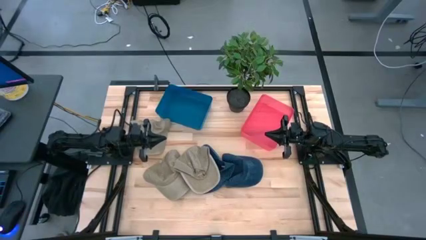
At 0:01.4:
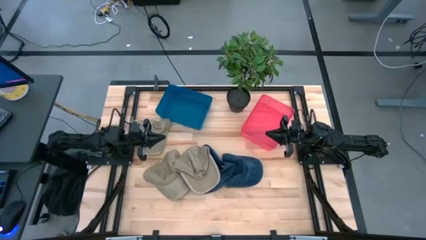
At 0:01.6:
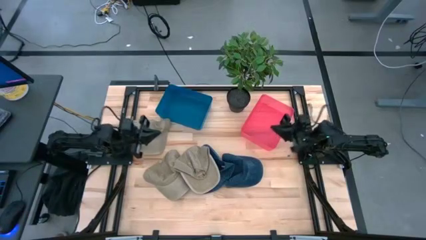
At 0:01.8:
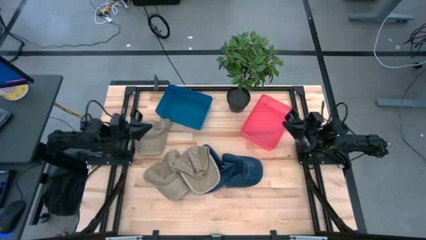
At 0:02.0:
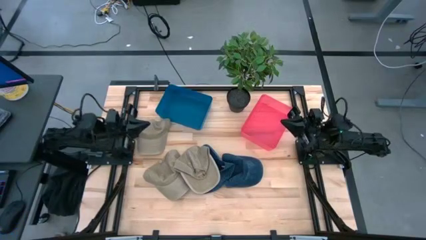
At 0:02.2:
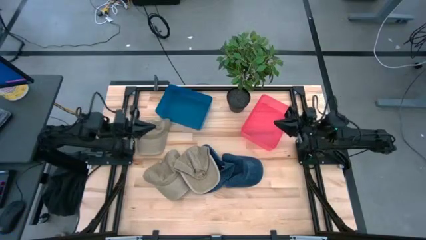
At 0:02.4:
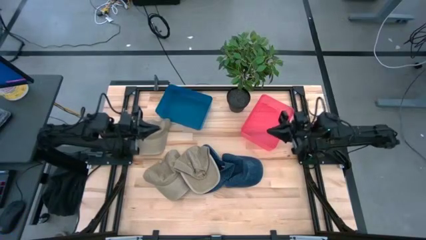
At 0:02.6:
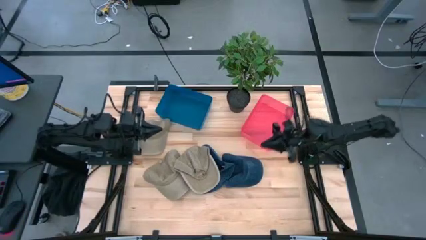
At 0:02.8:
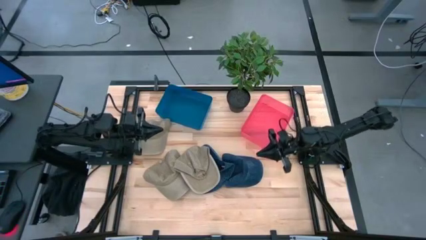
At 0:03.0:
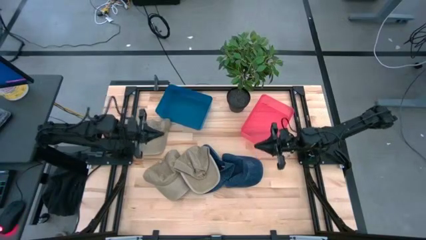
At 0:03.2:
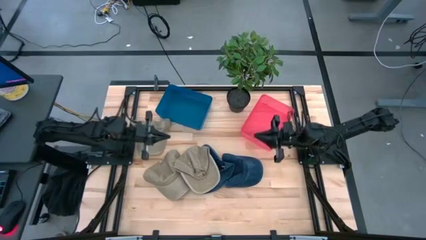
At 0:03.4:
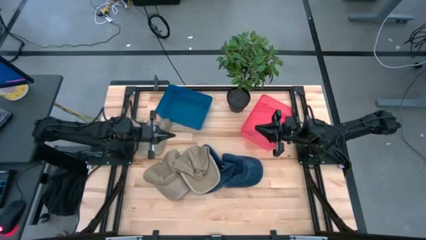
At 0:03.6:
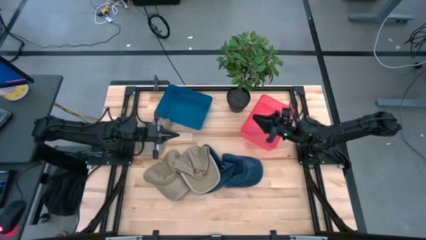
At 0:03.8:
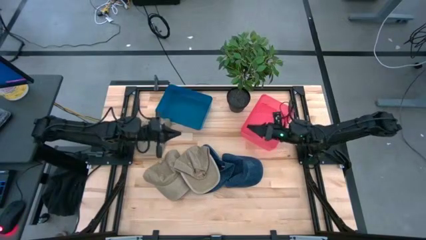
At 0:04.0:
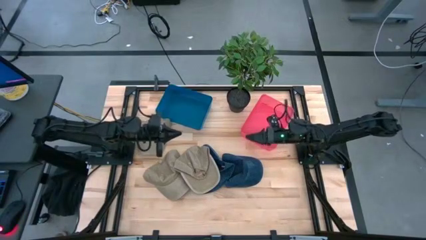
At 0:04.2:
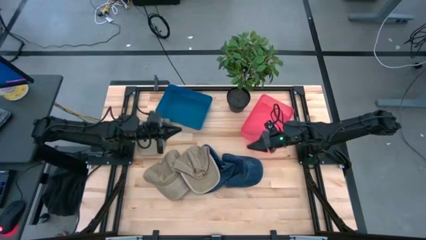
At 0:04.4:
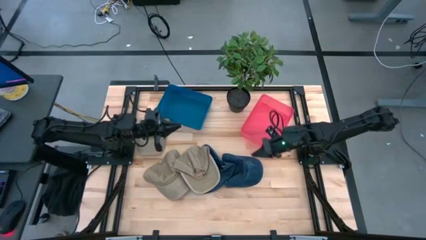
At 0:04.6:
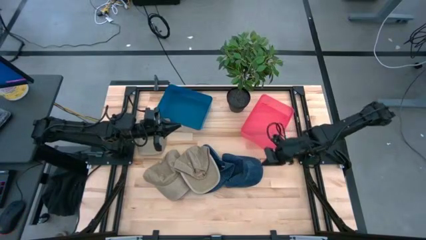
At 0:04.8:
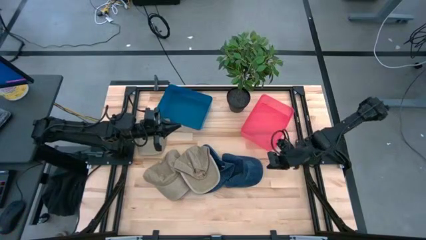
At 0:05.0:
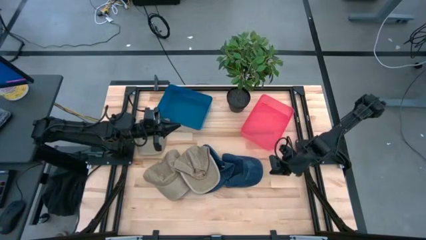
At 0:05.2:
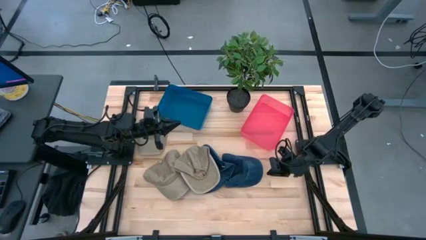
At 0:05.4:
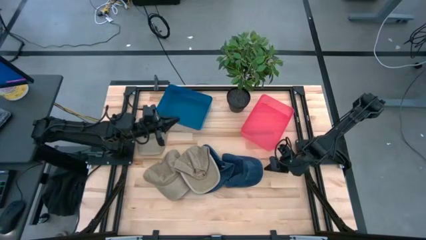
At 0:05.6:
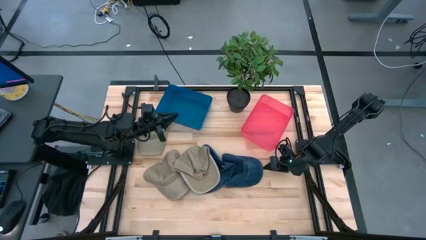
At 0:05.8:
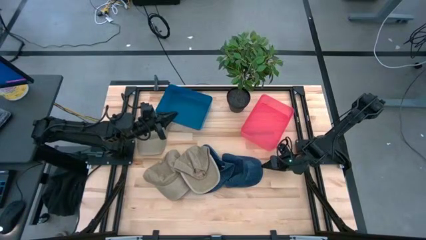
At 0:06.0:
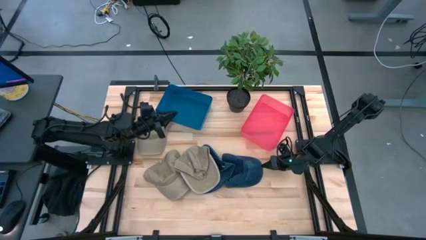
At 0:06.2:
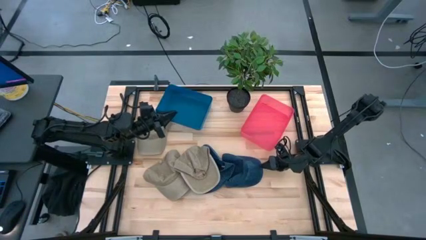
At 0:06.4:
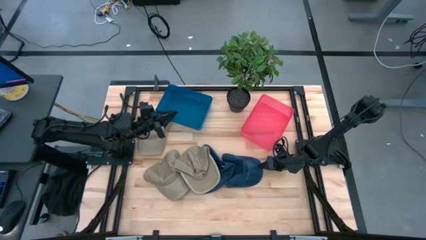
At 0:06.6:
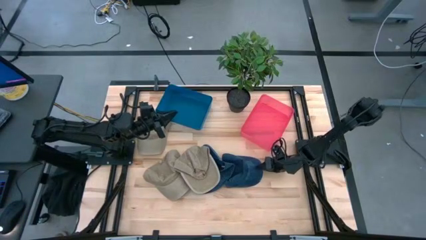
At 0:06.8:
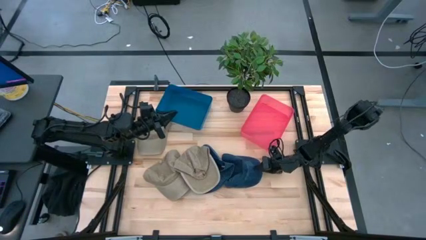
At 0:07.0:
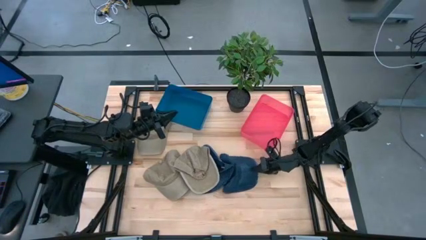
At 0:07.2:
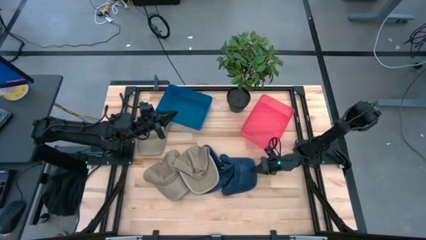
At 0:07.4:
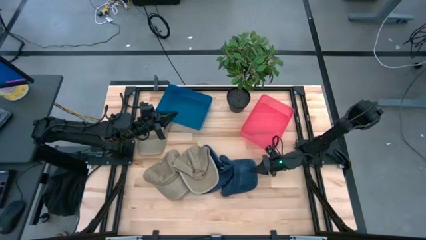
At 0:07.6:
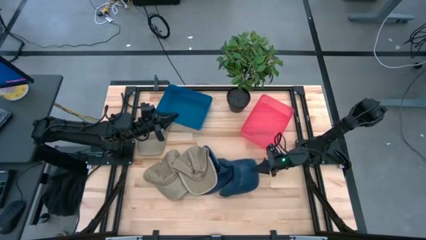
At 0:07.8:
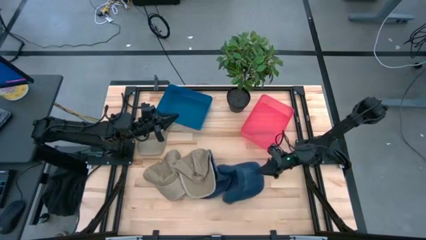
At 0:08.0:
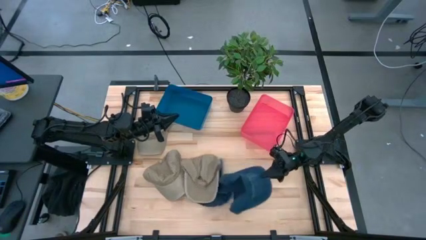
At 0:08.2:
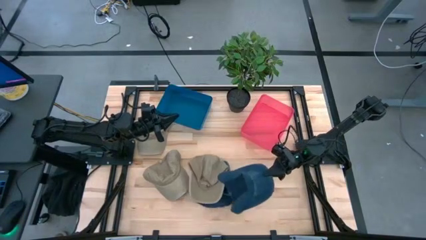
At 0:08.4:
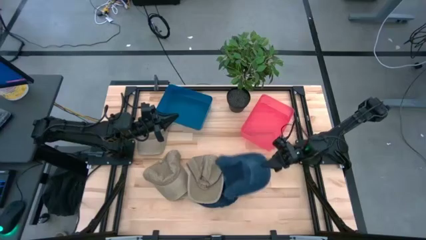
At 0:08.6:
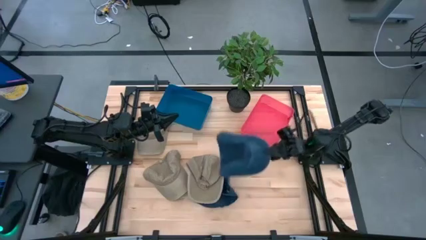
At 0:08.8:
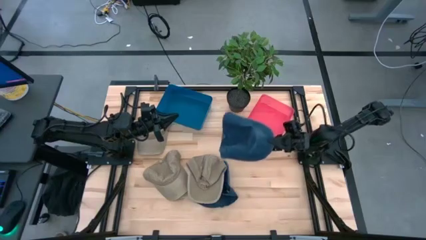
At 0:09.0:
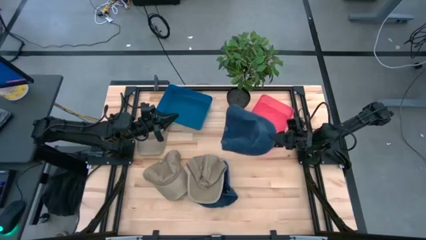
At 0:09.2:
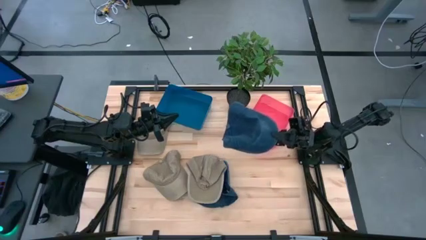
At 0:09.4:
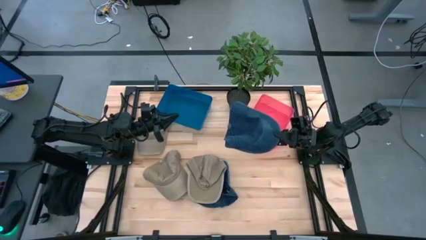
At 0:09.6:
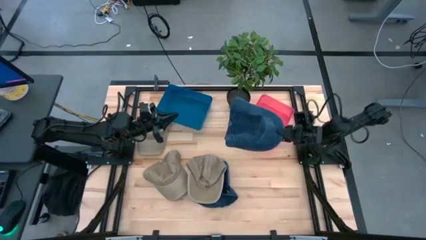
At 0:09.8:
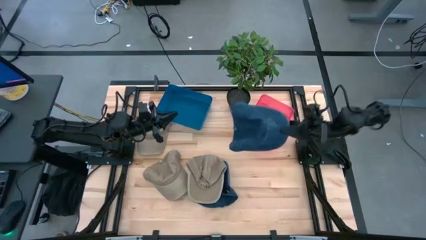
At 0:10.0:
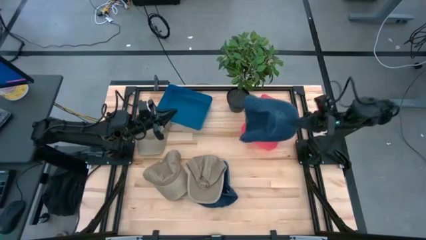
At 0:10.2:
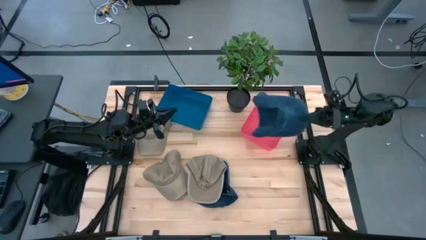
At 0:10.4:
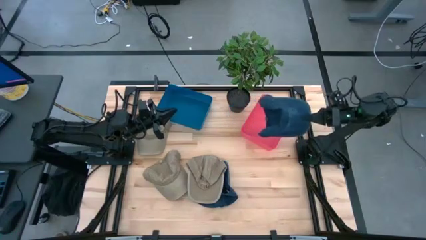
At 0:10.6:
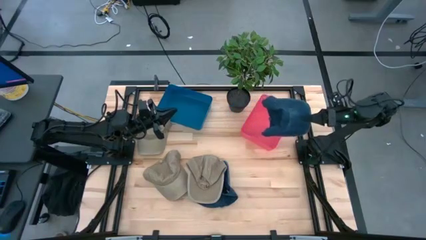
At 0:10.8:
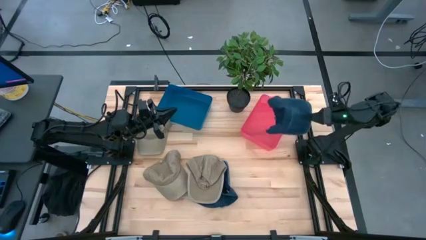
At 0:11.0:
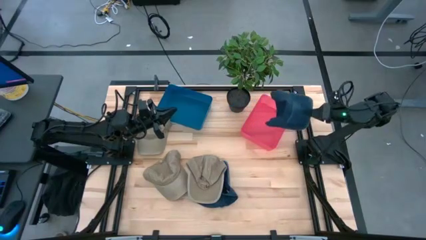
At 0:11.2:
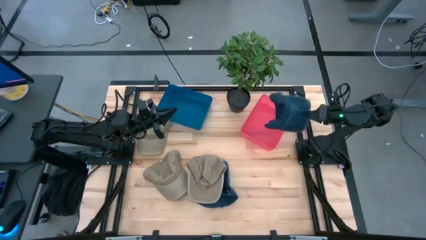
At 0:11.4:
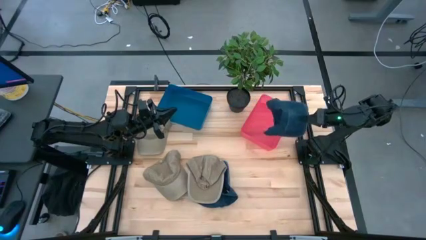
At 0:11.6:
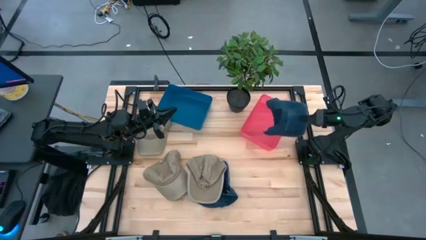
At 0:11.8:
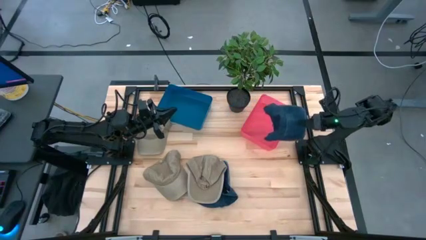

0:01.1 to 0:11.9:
Task: Pick & Place hat
Put the right blue cap into the red bin
